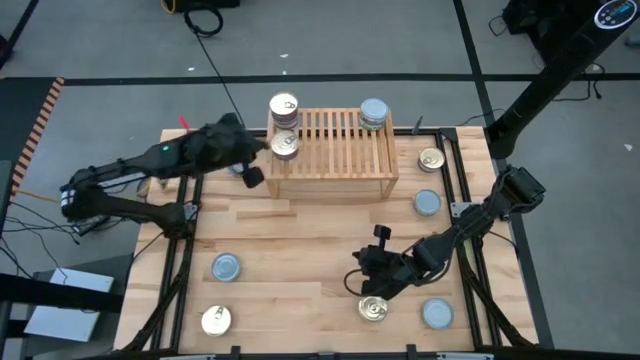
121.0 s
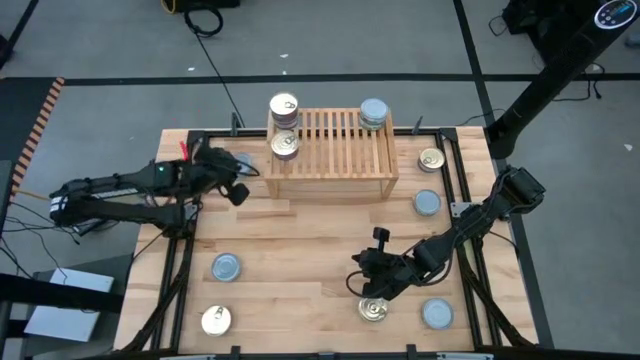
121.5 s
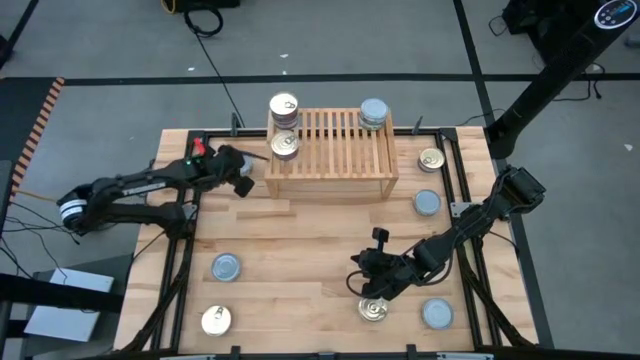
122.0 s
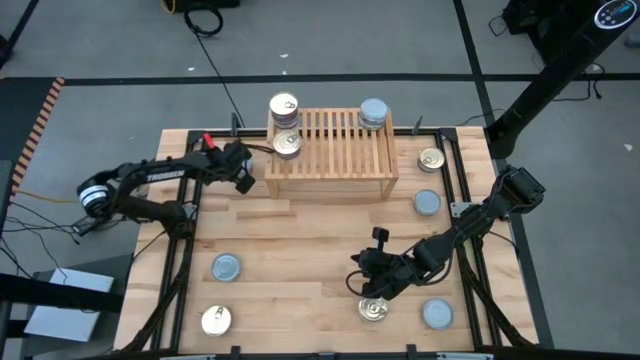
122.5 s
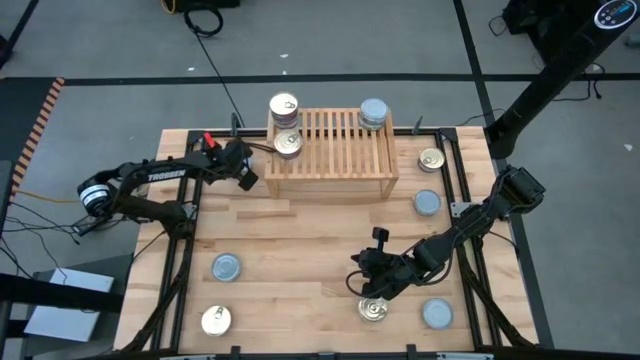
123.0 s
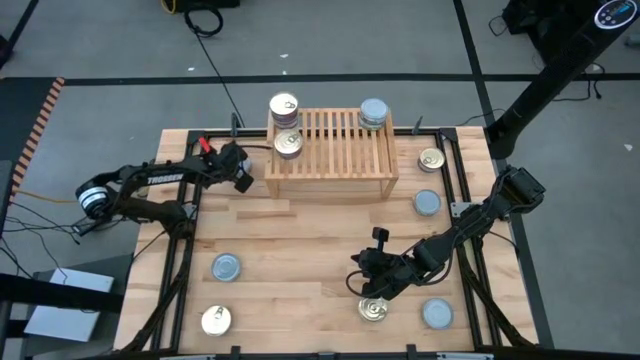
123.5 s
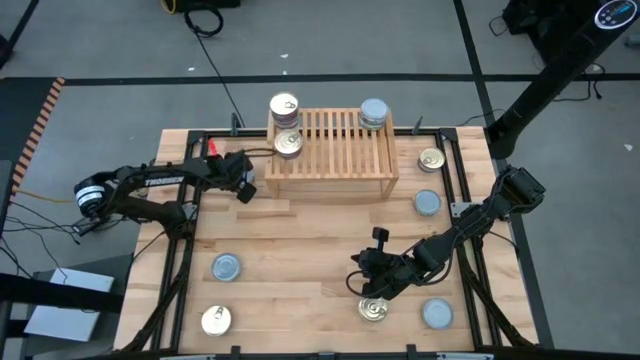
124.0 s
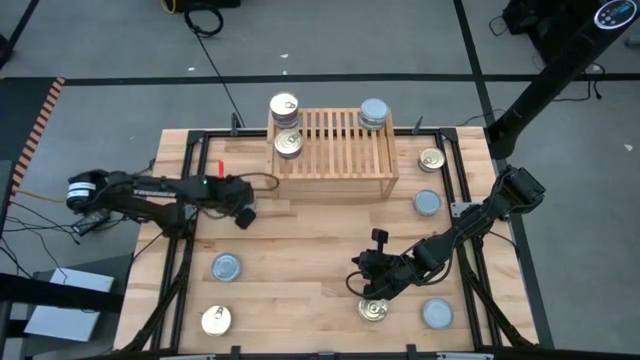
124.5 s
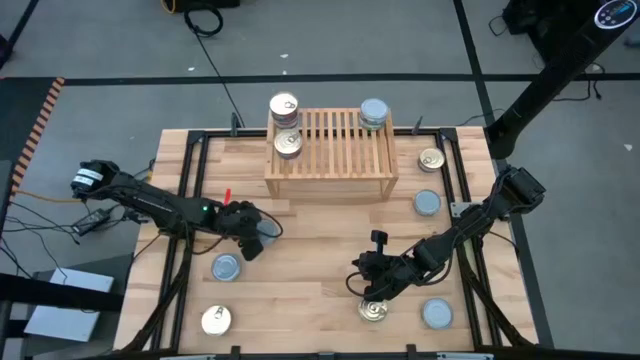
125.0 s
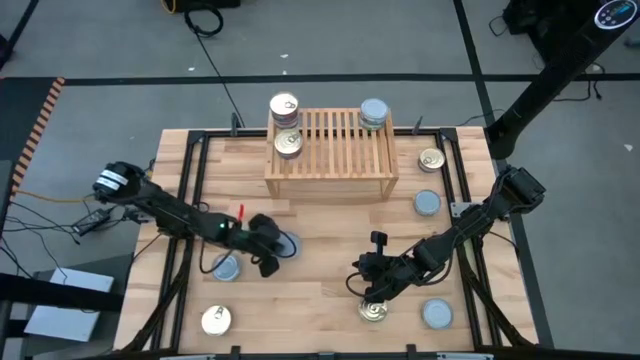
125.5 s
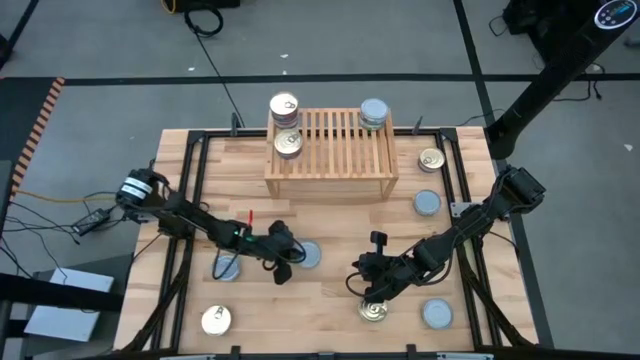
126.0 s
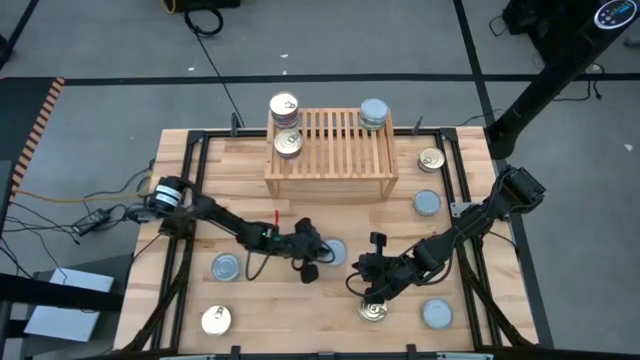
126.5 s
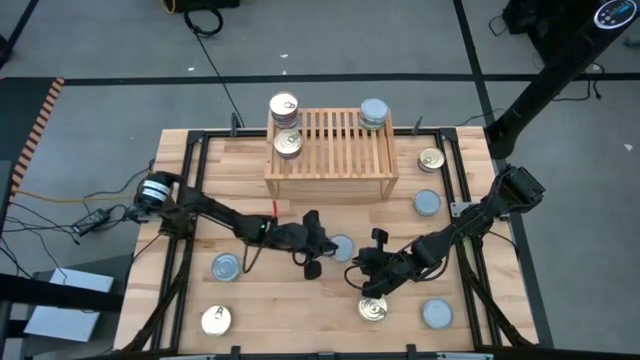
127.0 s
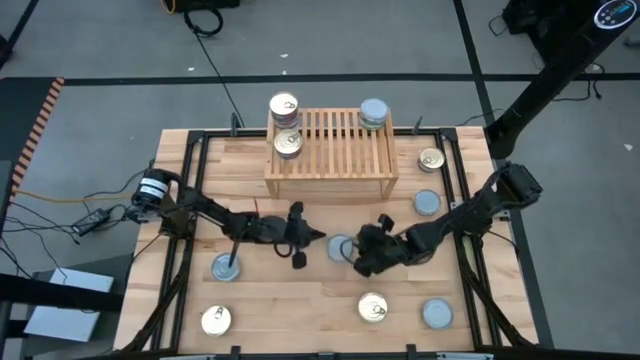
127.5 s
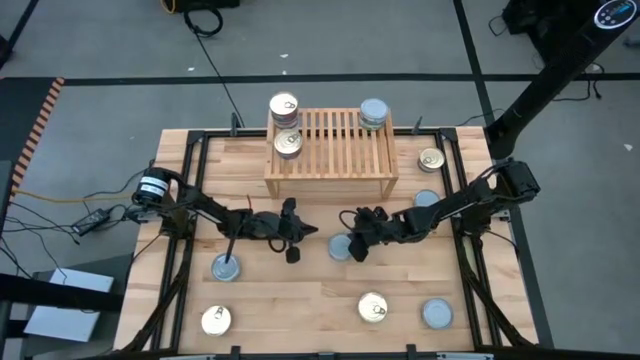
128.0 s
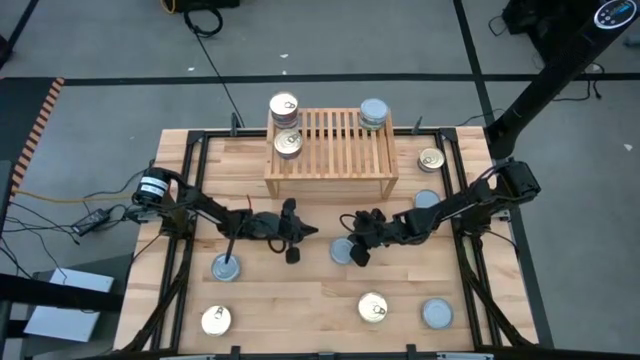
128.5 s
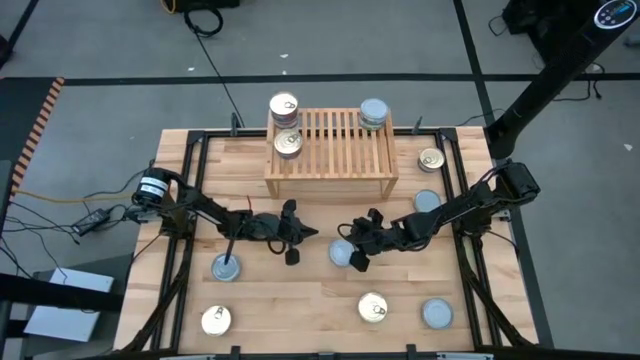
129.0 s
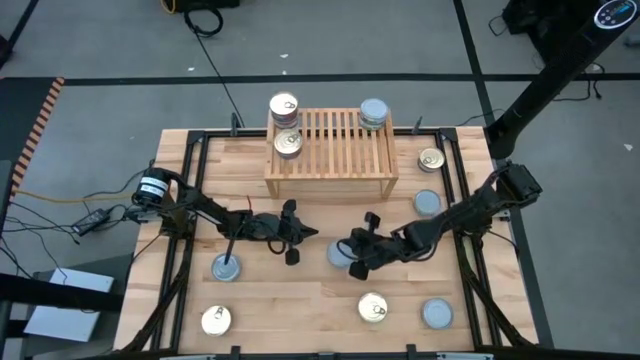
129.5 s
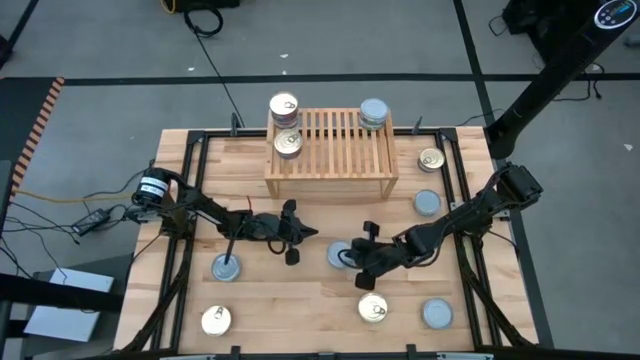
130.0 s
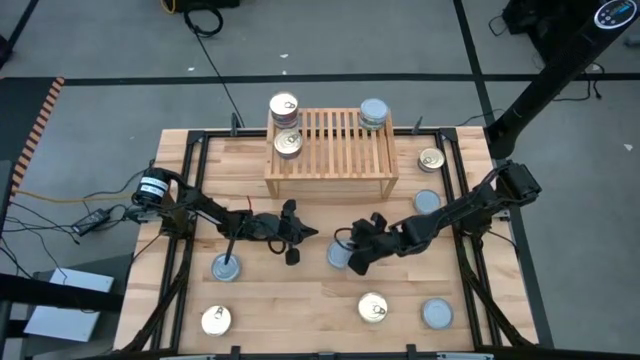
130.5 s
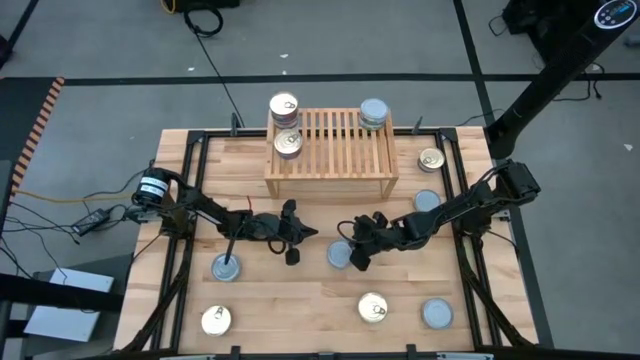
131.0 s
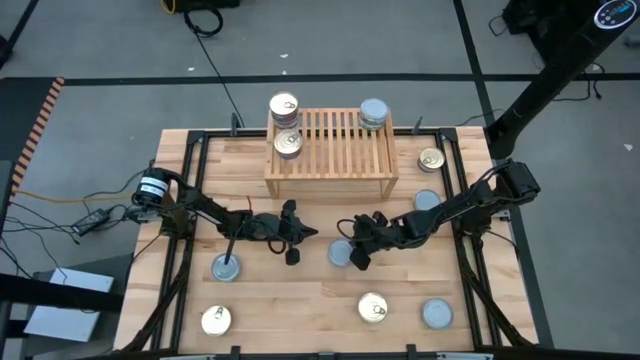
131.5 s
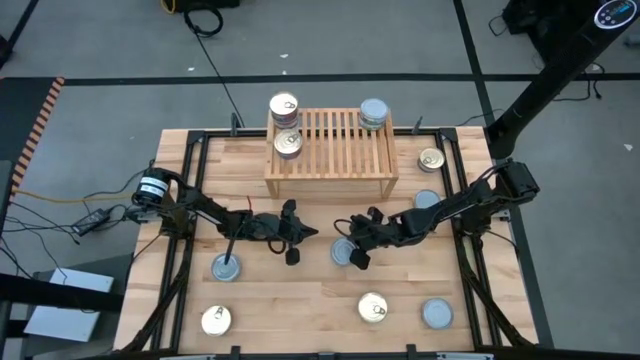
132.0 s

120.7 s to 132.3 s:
Task: Stack canned seafood by type on shelf
Put the green tuna can on the shelf

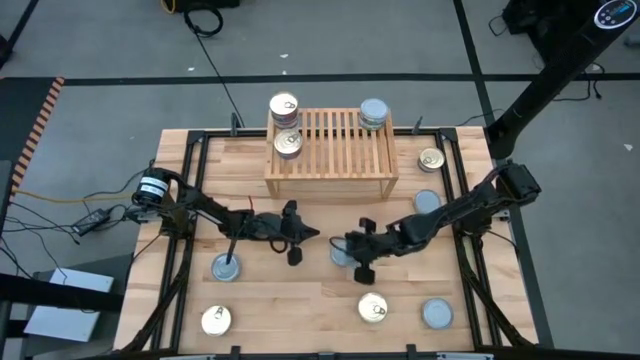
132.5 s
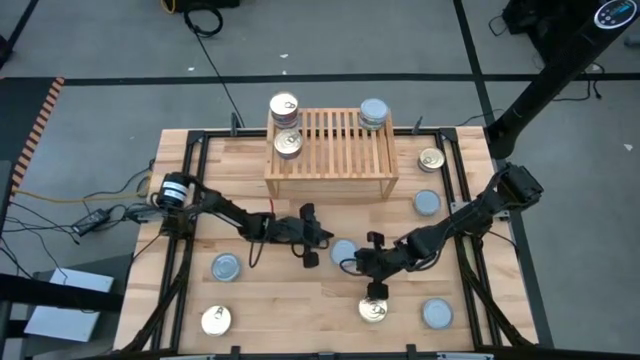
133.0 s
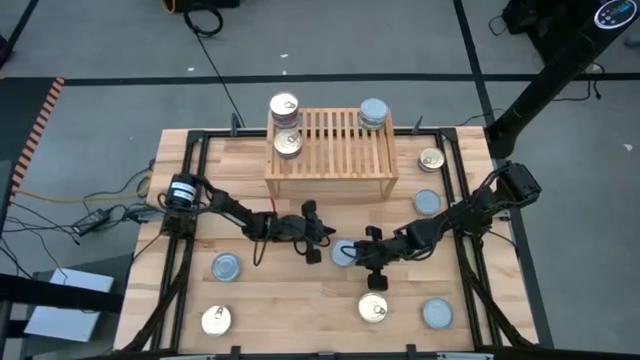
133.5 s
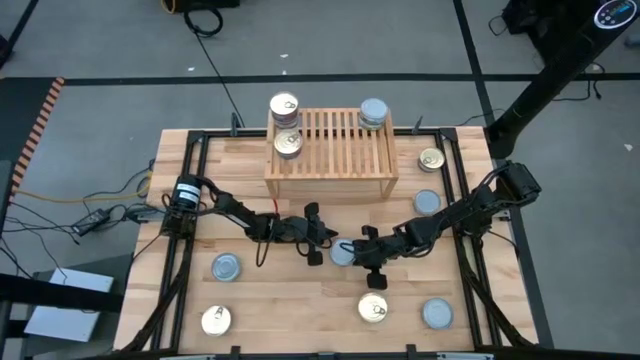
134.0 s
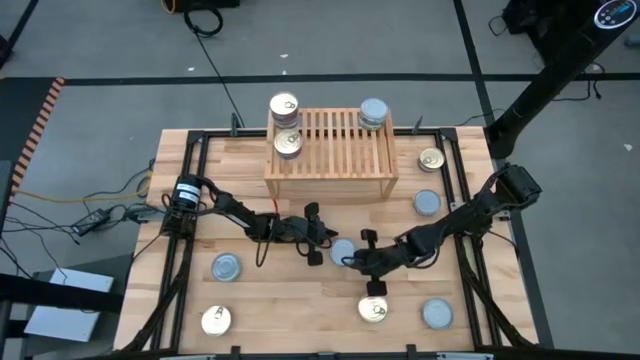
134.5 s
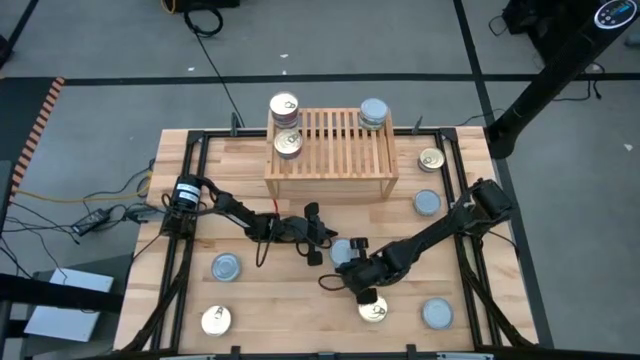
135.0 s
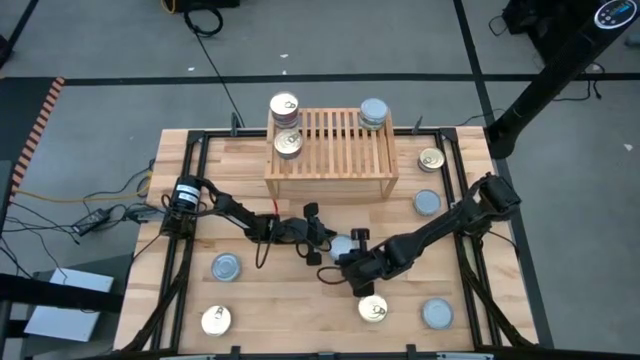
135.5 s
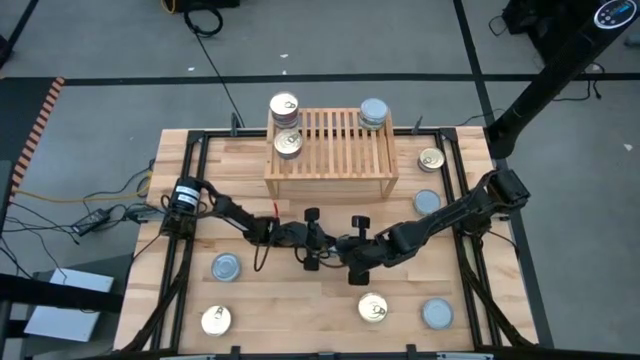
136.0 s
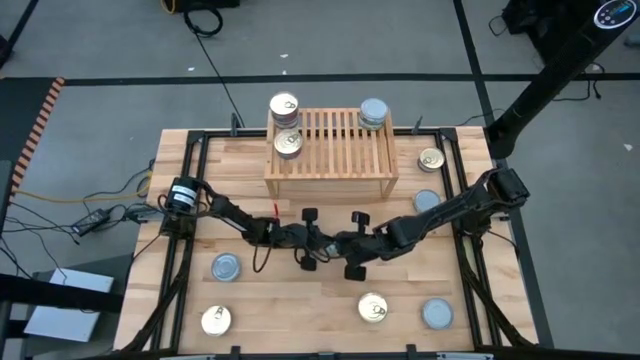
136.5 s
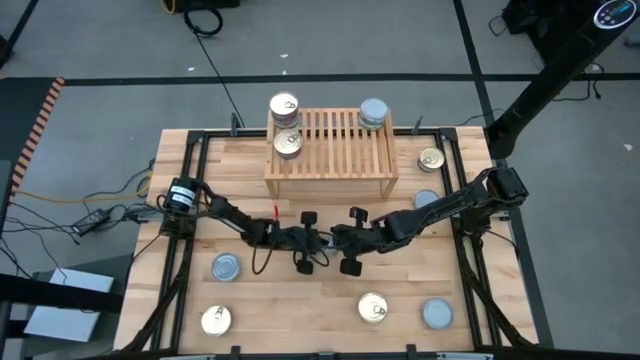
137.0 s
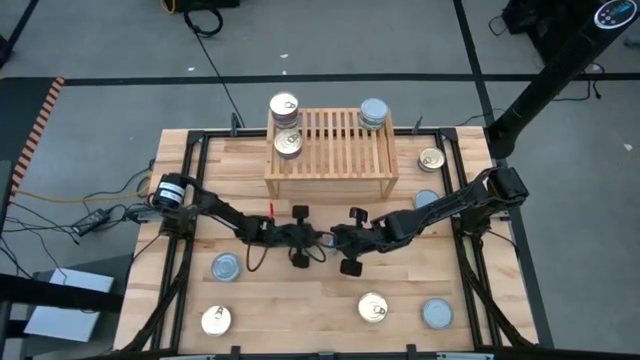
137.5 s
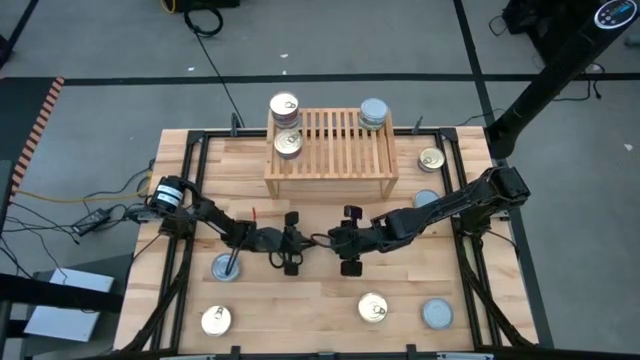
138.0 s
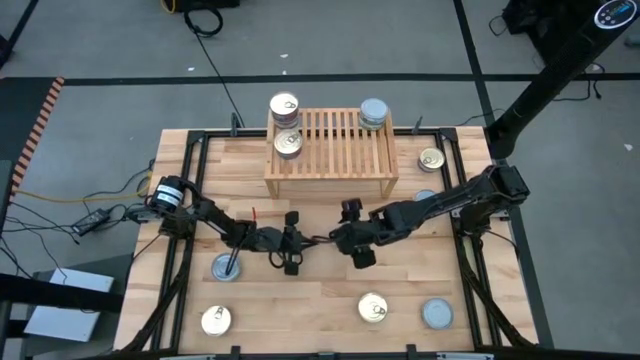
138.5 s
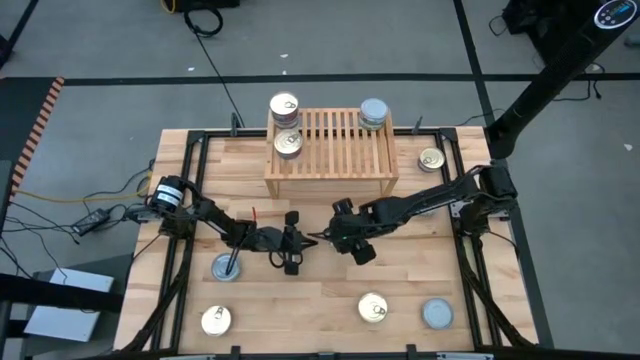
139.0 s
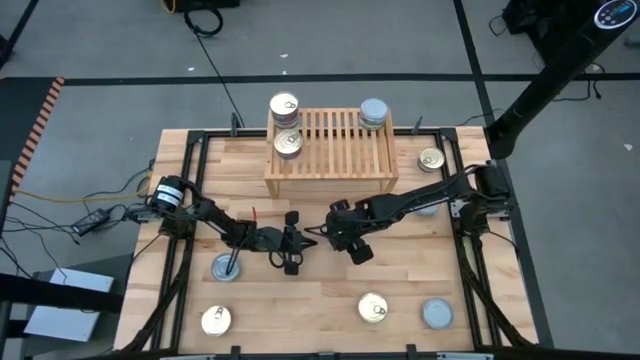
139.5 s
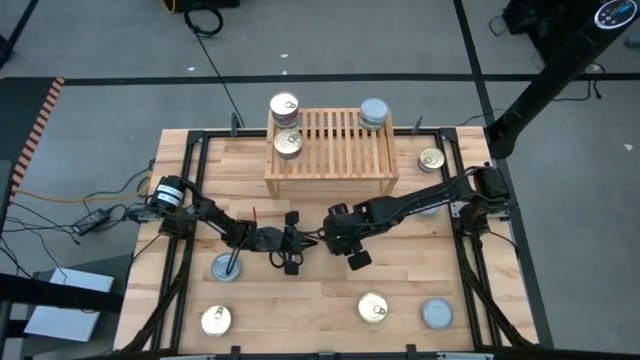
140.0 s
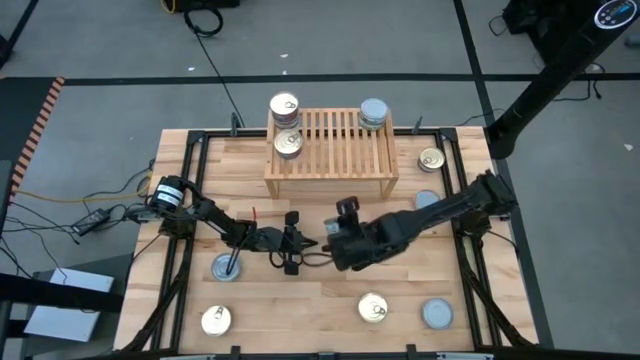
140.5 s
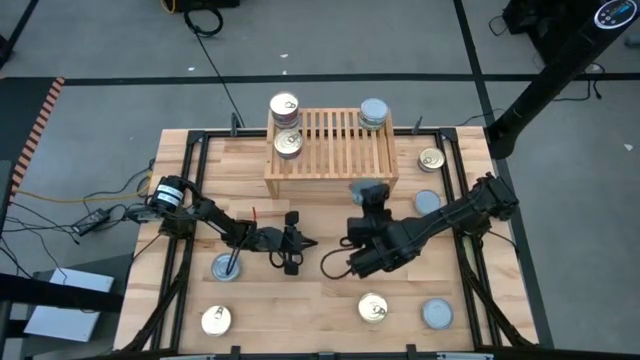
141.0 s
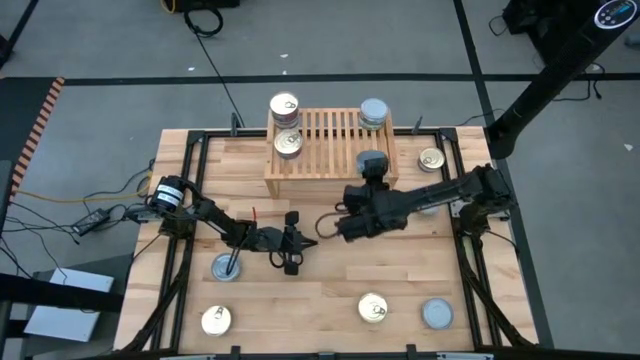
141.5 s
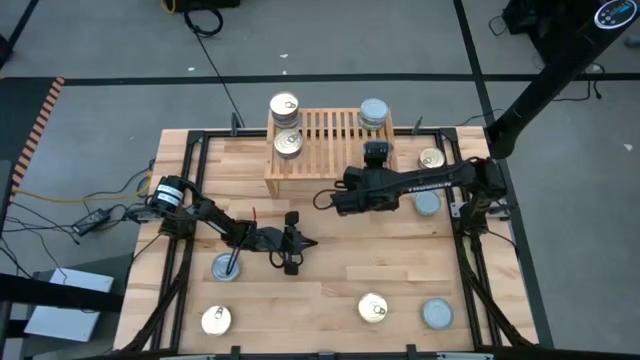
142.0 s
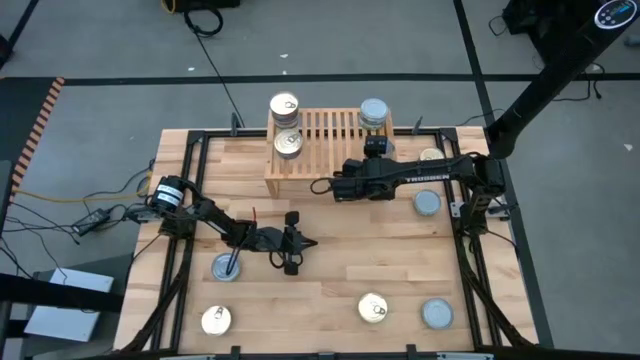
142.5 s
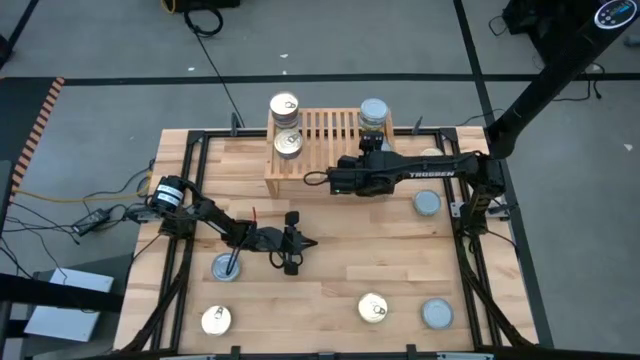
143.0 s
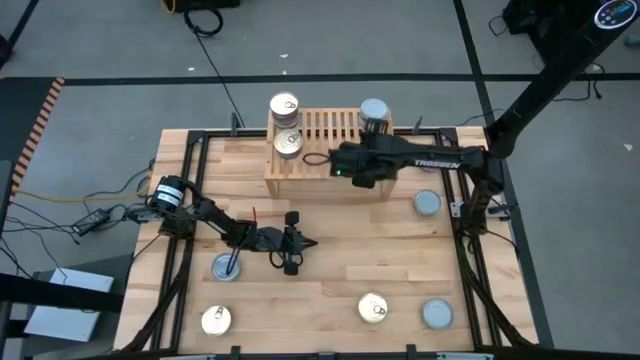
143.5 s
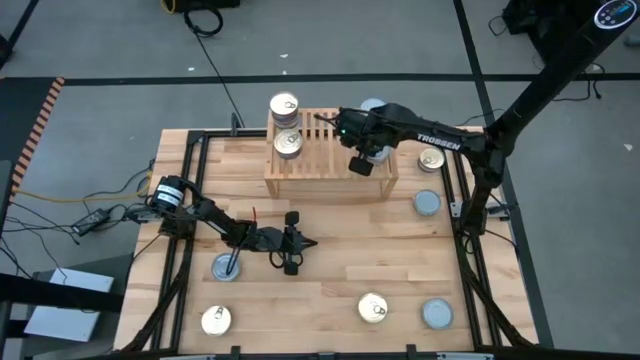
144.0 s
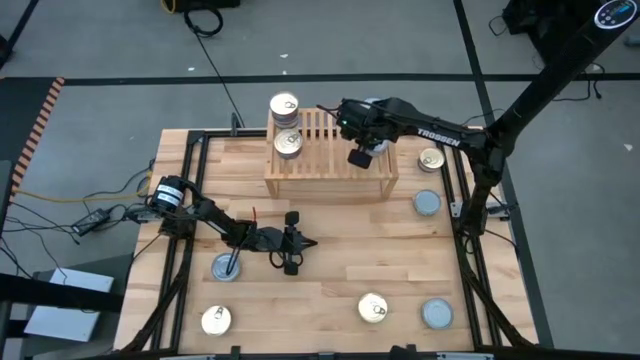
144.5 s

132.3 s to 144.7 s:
Put the green tuna can on the shelf
